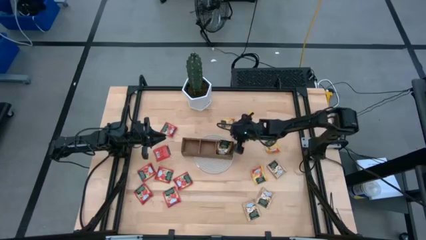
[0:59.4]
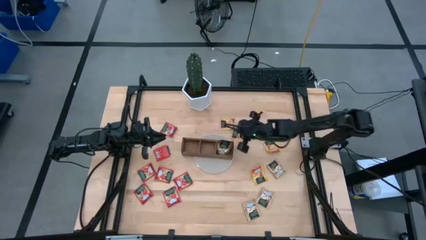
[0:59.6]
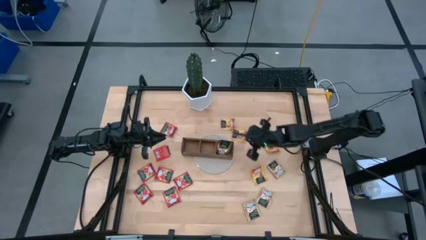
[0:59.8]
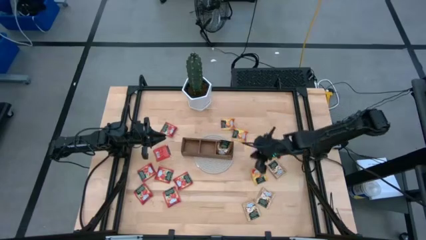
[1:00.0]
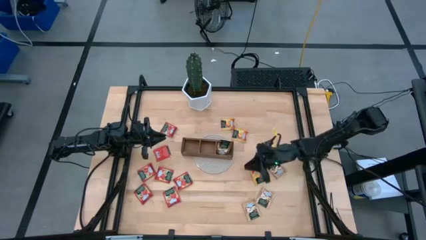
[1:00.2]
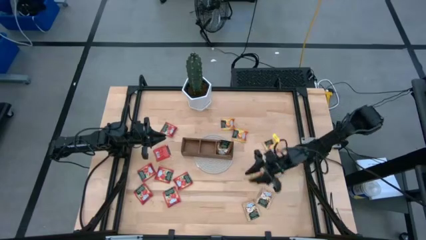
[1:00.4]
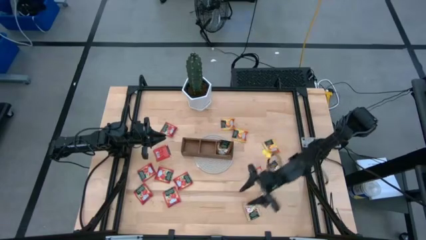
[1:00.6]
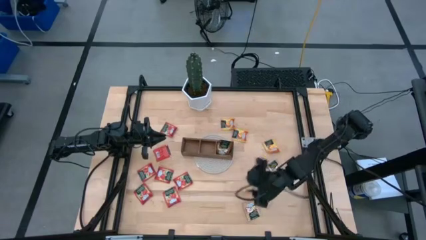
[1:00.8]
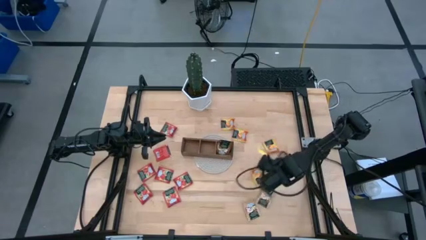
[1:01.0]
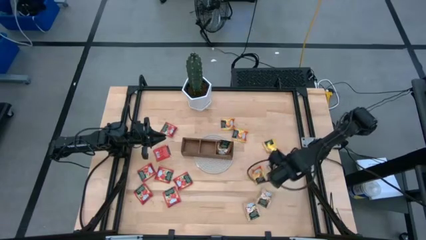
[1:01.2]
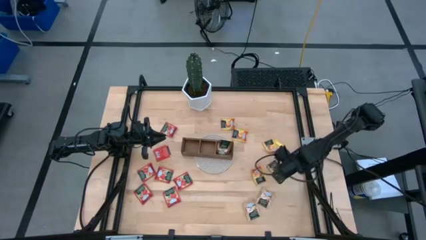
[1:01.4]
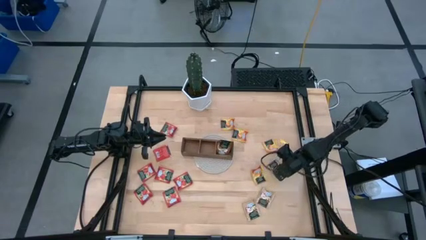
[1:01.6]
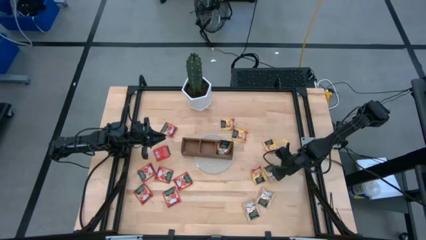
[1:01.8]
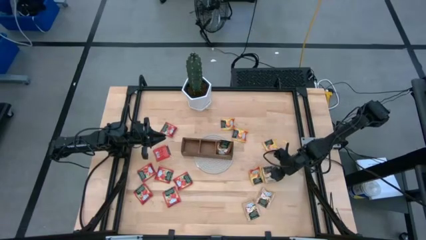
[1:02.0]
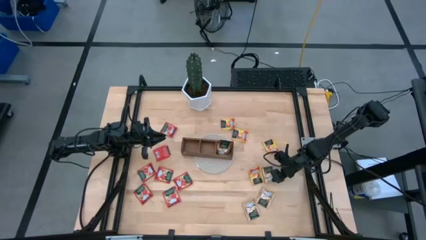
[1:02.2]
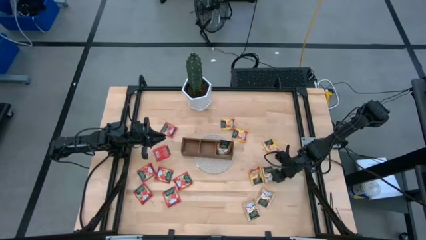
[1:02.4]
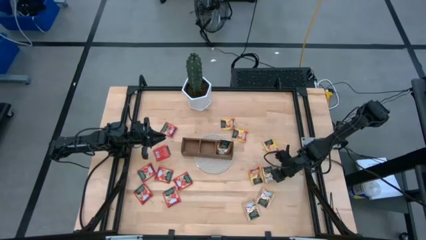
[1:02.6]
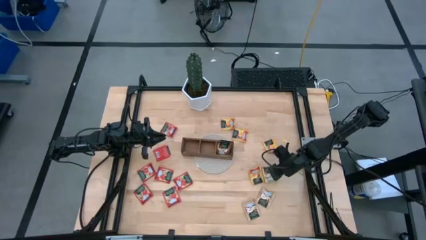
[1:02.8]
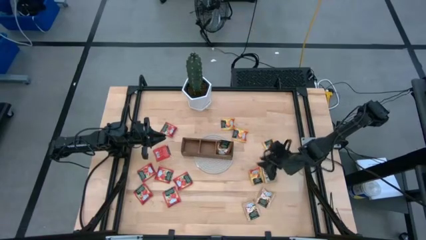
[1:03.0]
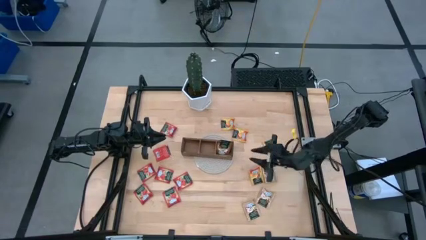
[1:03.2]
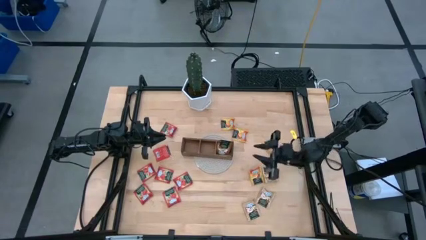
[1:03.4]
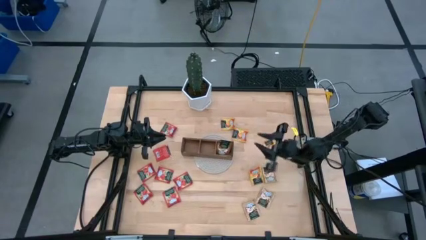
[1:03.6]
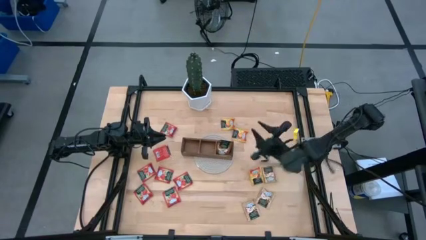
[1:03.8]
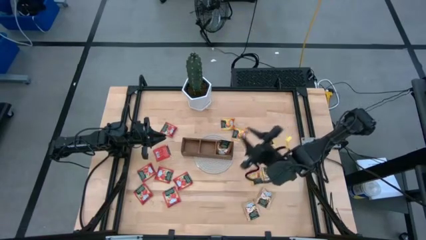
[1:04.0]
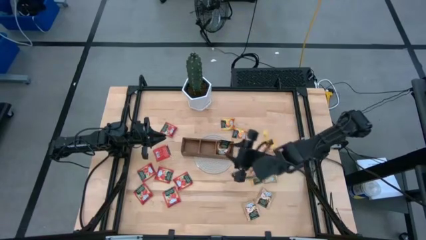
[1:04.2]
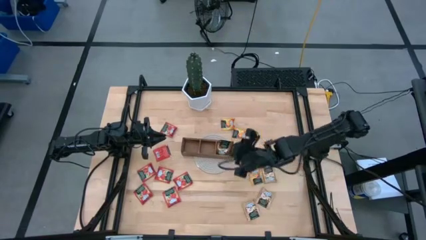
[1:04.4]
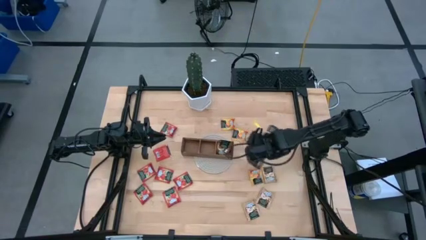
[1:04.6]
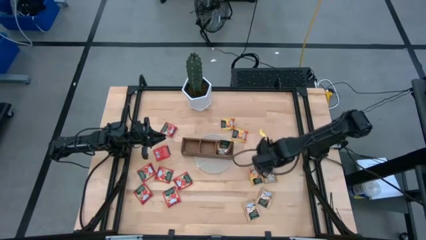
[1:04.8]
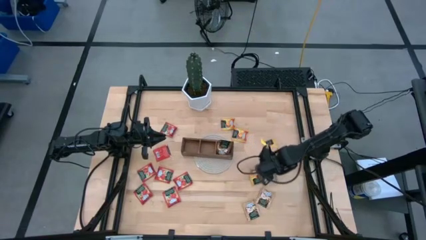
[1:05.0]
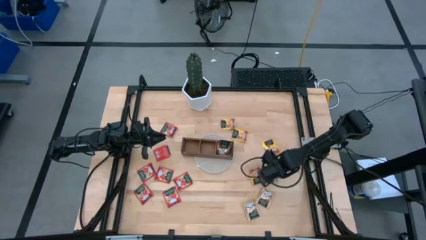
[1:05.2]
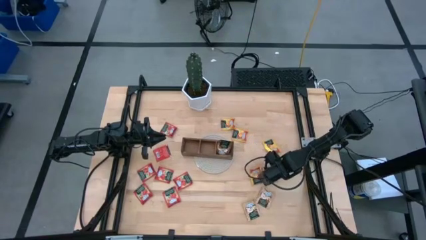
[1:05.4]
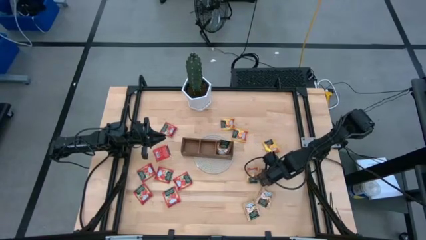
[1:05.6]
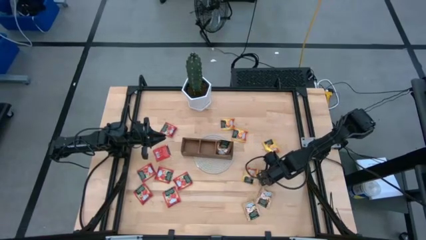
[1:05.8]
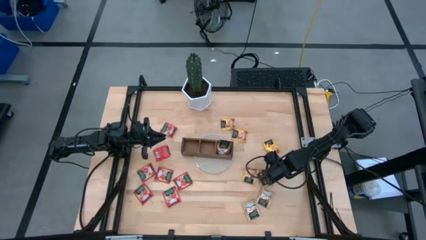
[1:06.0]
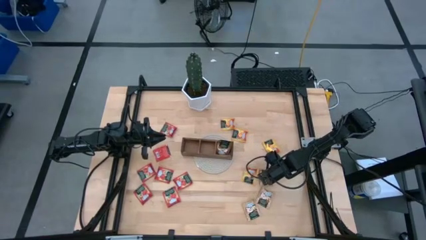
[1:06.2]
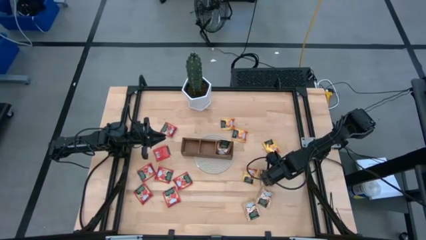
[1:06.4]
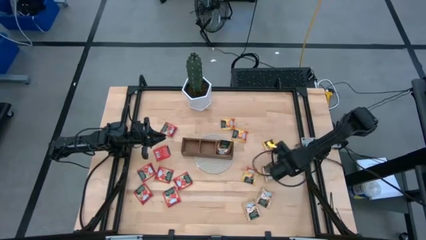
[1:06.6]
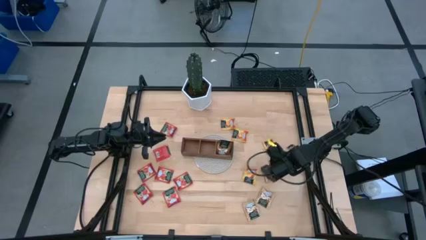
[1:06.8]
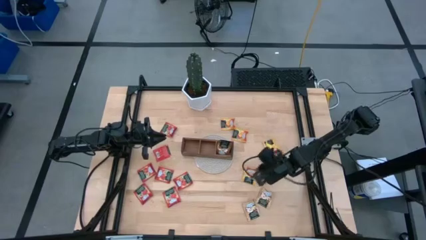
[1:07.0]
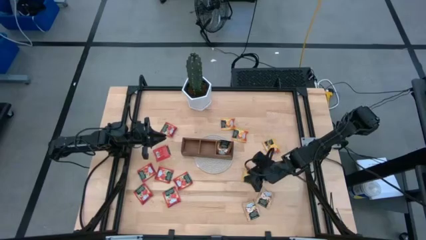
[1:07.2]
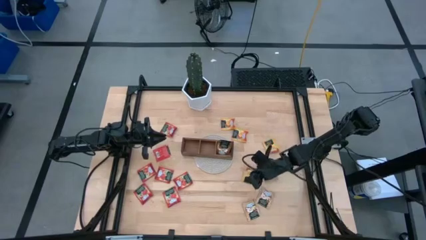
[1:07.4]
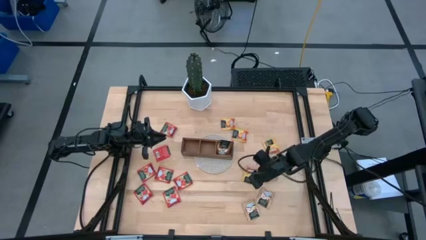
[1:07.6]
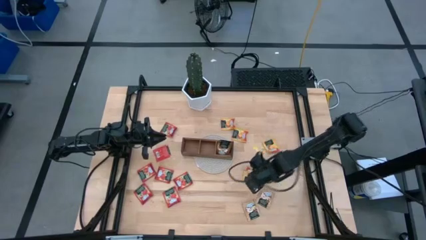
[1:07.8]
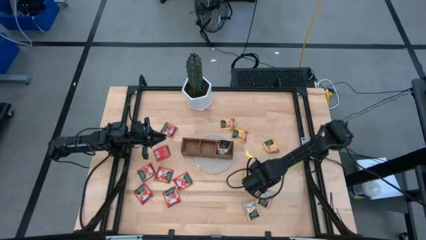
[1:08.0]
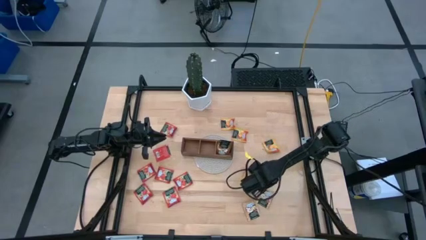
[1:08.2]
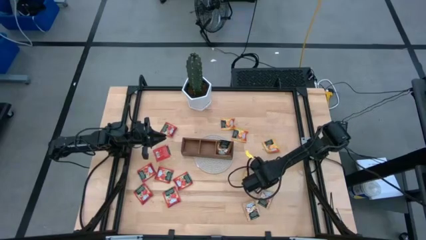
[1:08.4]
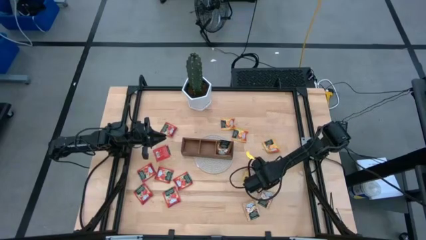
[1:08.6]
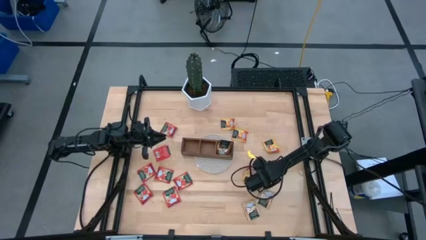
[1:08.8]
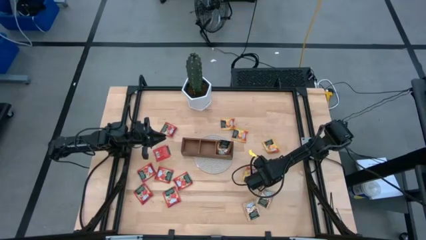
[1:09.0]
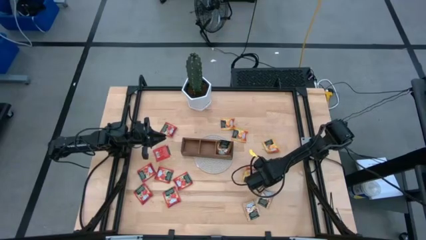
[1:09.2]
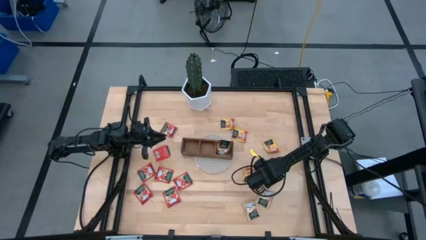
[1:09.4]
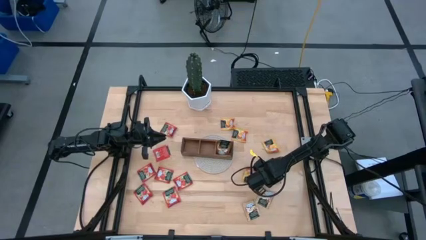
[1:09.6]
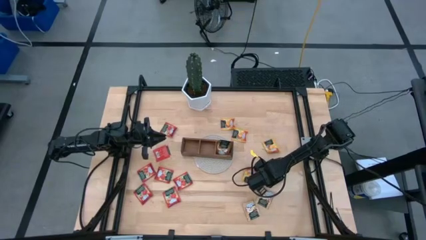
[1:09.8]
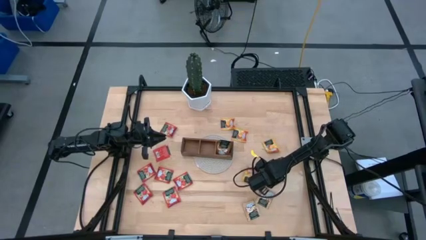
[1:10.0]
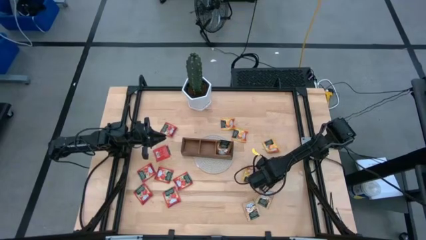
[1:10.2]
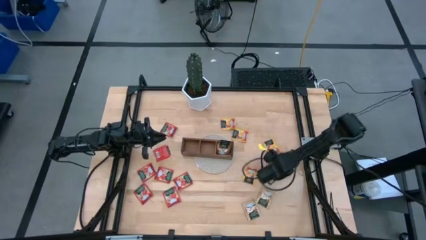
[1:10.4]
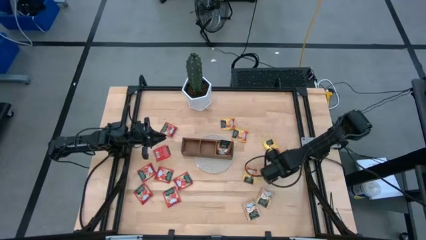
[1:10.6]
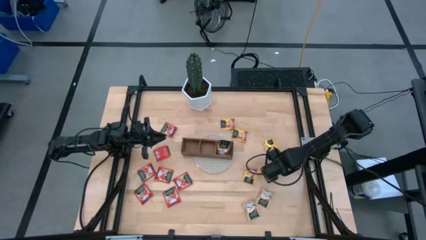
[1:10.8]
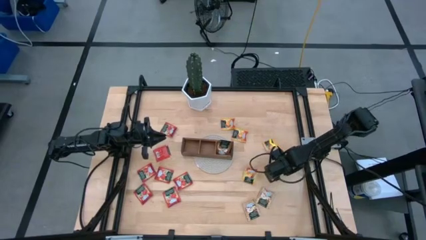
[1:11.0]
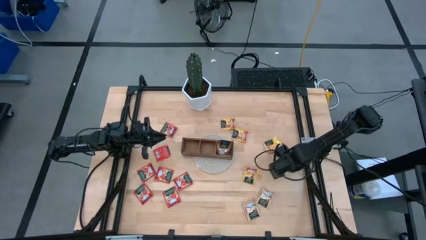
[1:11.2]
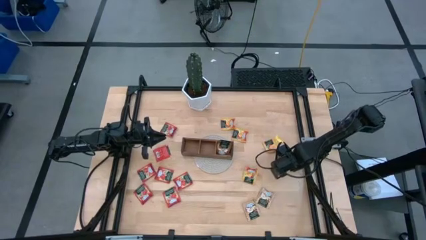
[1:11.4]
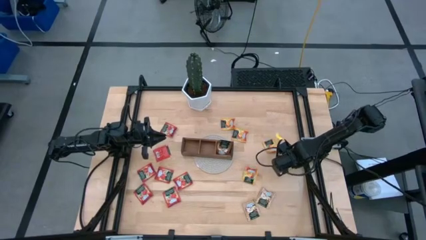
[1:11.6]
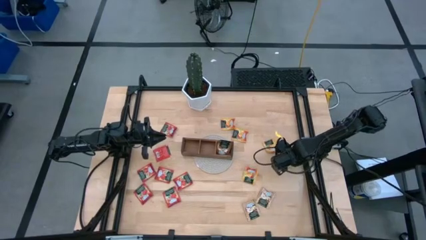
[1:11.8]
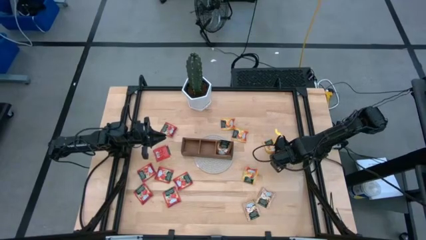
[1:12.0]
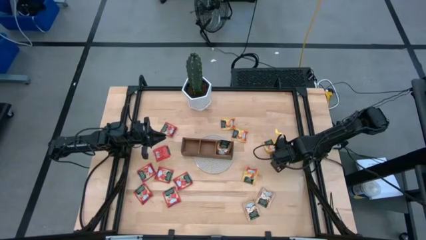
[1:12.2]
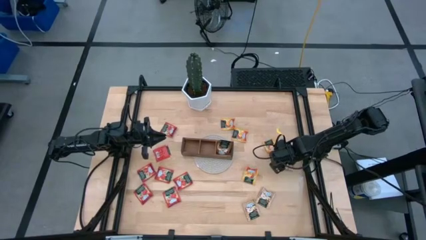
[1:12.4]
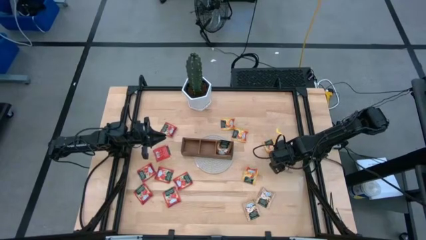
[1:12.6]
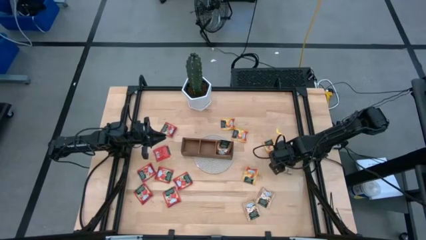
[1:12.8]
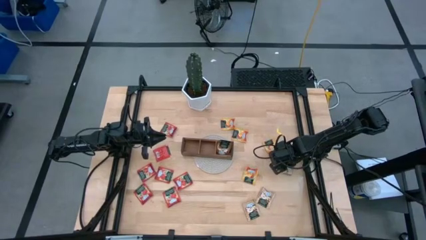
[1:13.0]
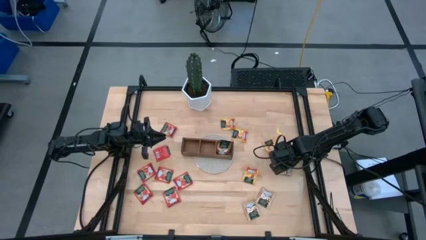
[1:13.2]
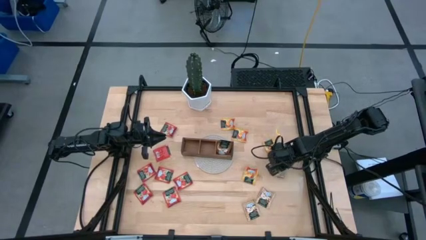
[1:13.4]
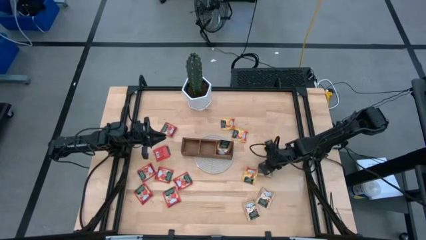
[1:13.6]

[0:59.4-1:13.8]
Task: Pick & Place Tea
Put the brown tea bag into the right section of the wooden organizer

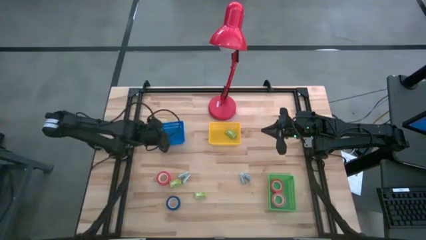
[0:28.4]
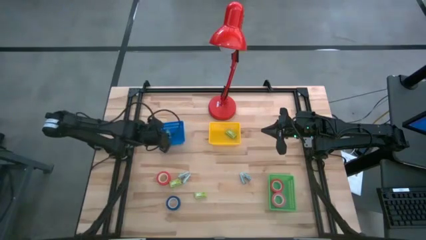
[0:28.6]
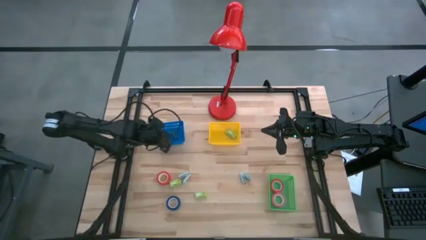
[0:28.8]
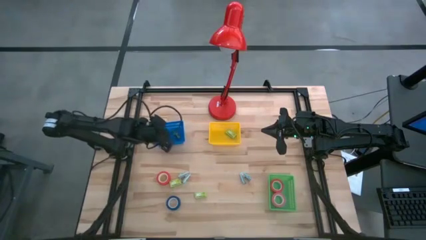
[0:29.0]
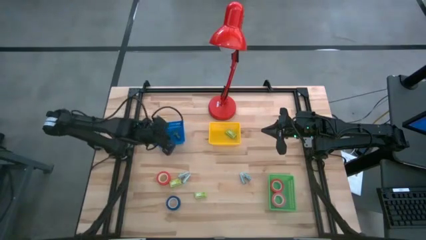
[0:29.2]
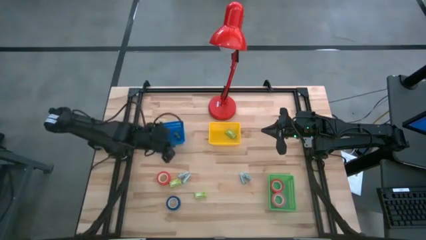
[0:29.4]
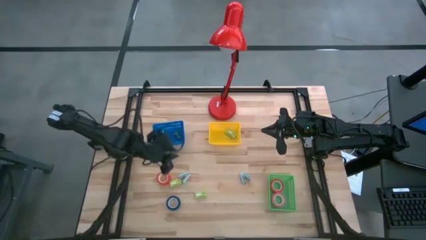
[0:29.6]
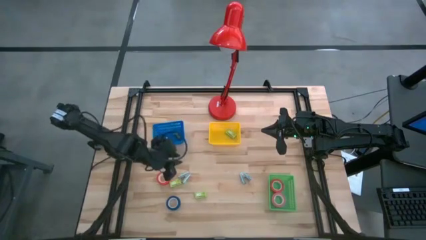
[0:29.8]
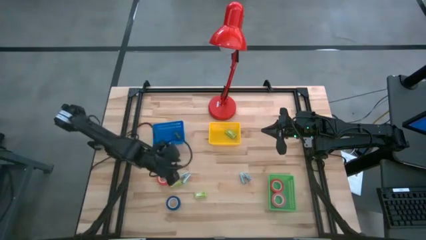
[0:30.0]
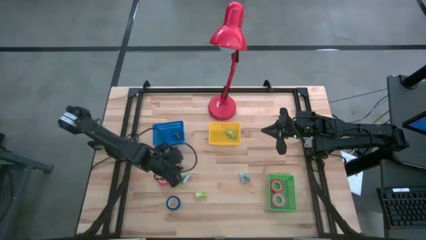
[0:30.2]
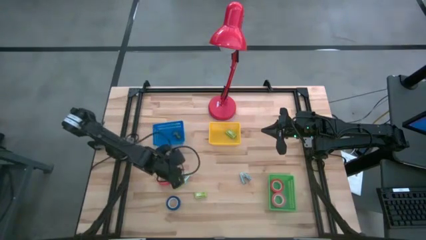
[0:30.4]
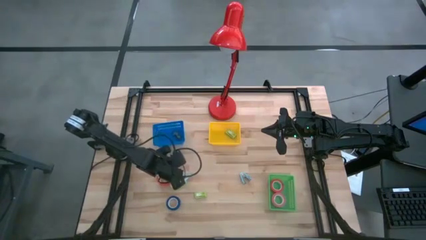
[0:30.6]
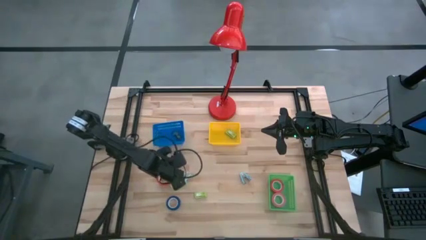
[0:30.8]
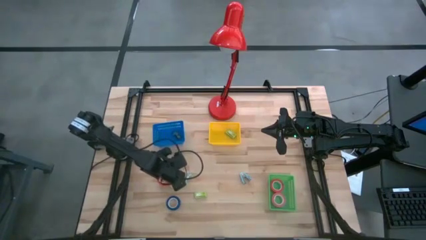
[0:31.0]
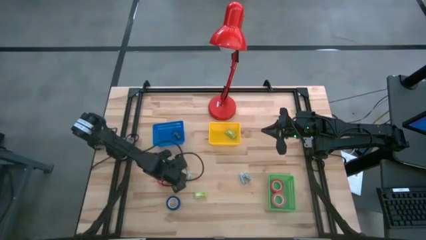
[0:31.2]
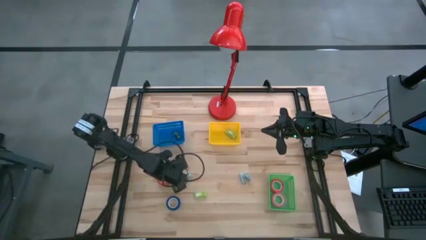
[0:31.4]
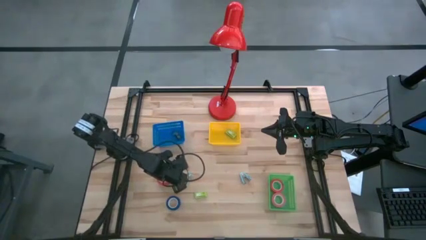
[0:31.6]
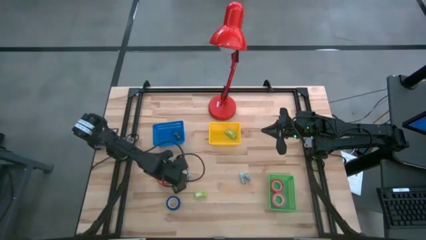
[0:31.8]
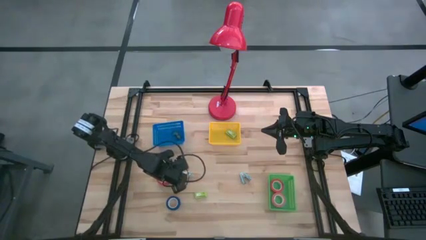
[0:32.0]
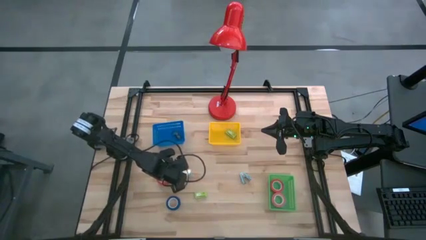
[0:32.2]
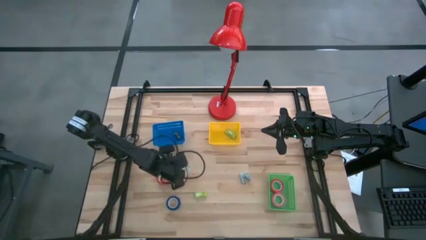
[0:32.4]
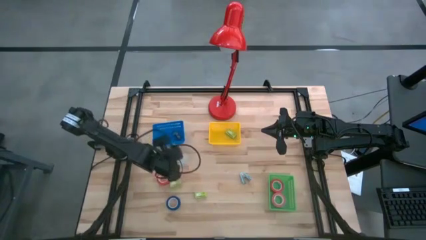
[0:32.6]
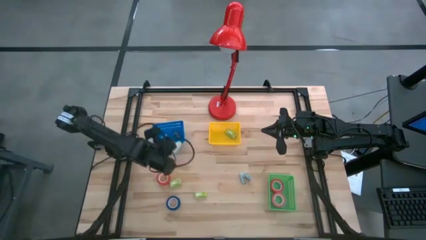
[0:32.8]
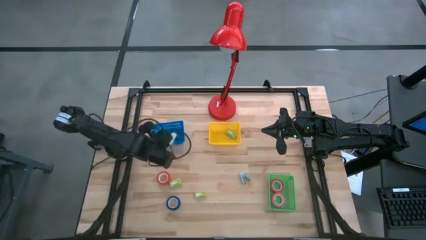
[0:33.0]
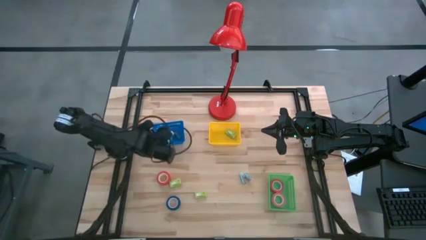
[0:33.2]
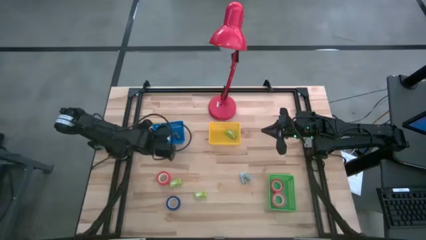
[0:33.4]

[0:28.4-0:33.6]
Task: Pick and place Stapler, Stapler remover, tape
Put the left light blue staple remover into the blue bin
